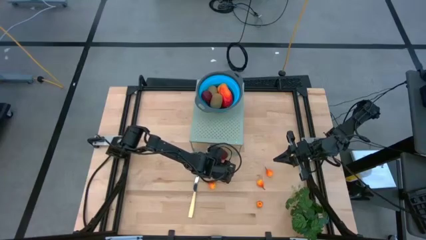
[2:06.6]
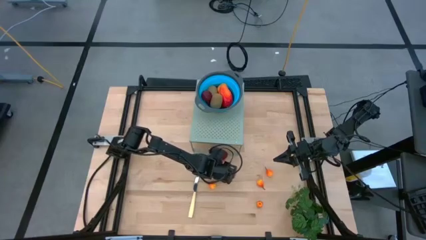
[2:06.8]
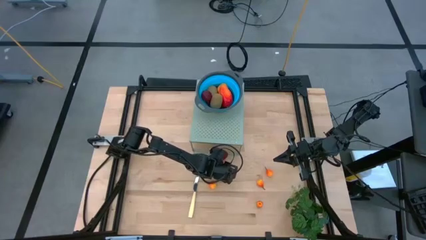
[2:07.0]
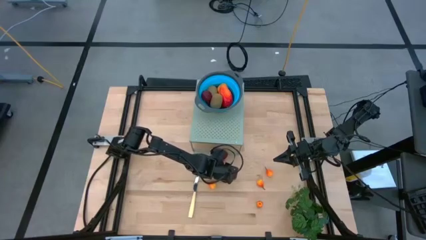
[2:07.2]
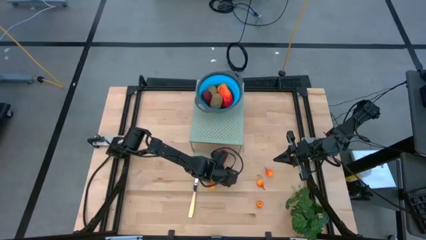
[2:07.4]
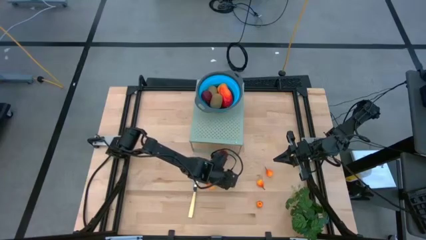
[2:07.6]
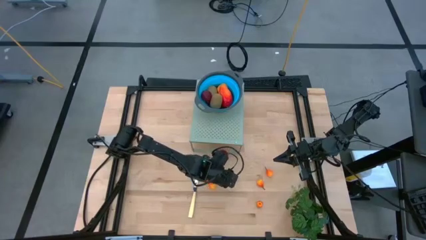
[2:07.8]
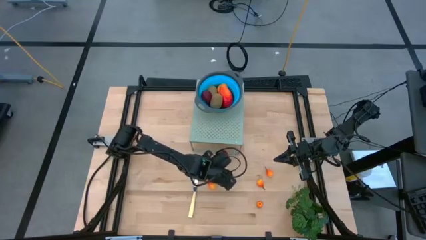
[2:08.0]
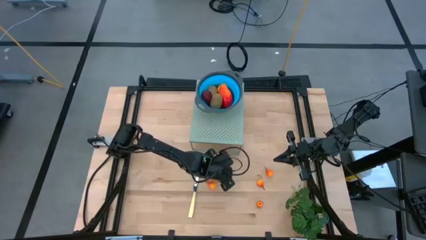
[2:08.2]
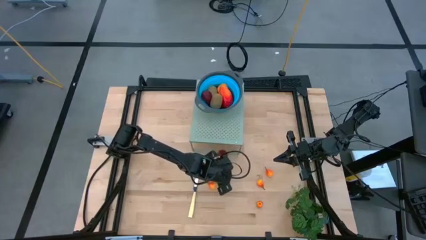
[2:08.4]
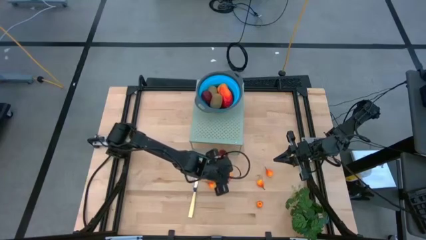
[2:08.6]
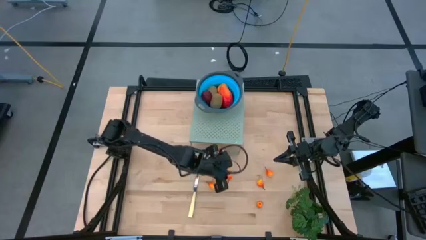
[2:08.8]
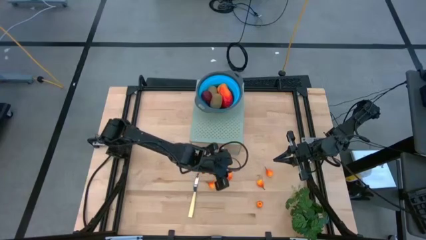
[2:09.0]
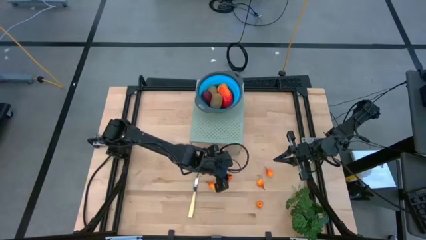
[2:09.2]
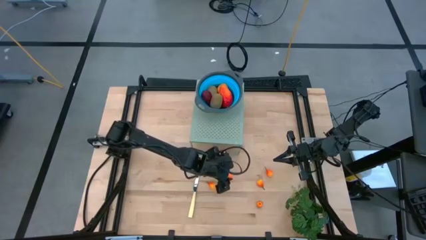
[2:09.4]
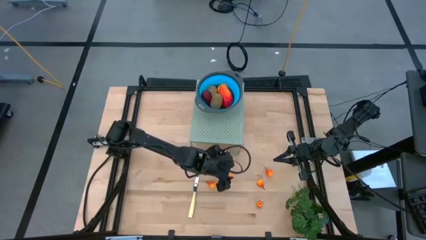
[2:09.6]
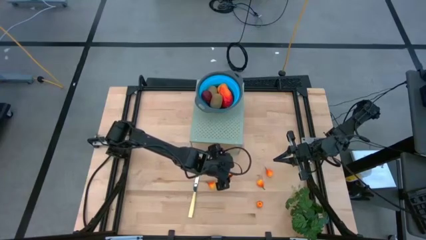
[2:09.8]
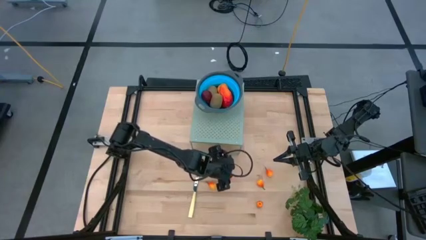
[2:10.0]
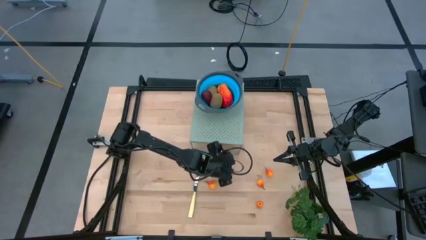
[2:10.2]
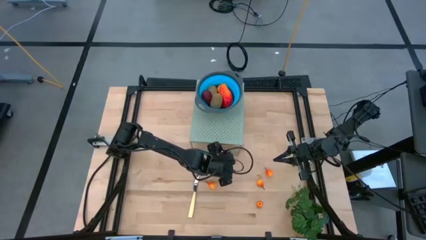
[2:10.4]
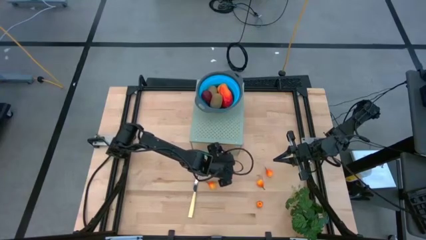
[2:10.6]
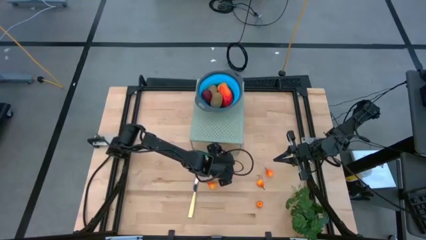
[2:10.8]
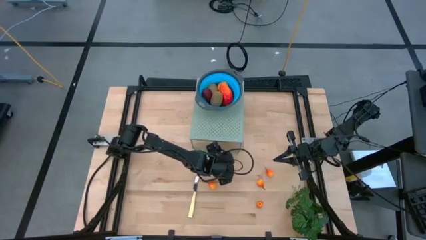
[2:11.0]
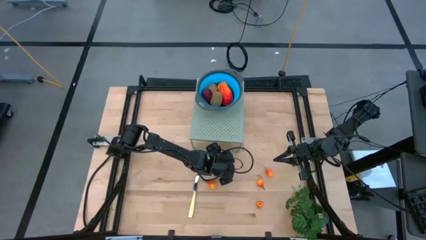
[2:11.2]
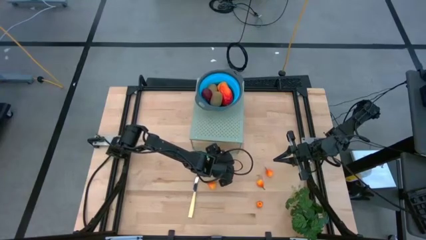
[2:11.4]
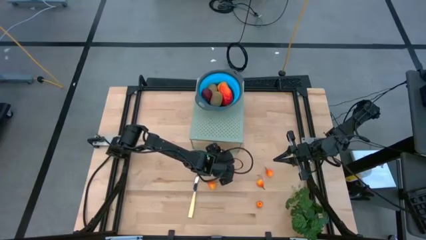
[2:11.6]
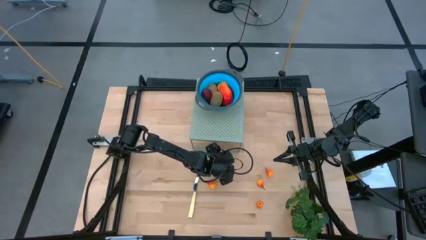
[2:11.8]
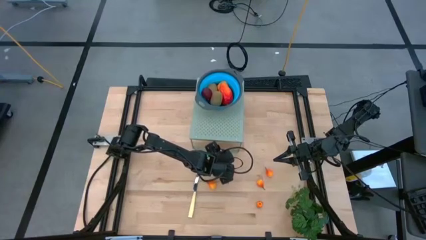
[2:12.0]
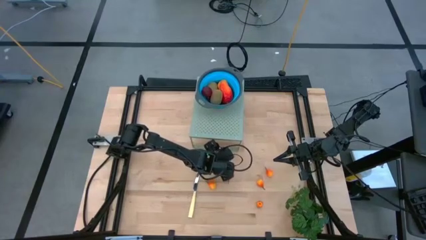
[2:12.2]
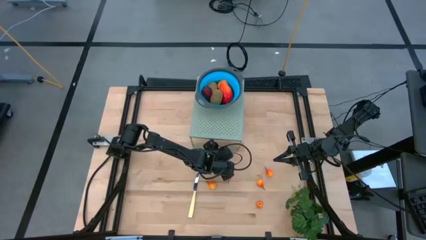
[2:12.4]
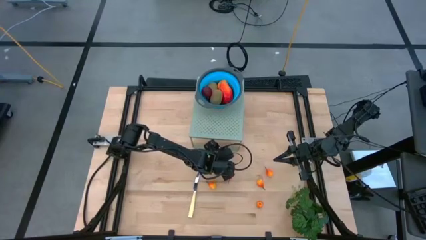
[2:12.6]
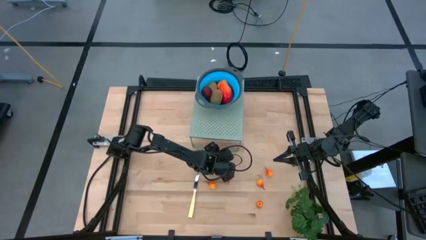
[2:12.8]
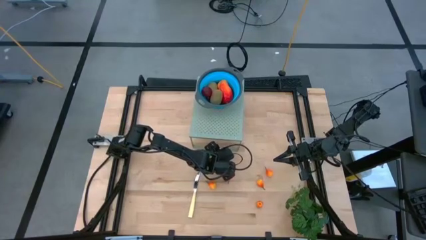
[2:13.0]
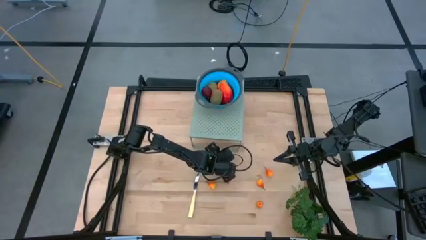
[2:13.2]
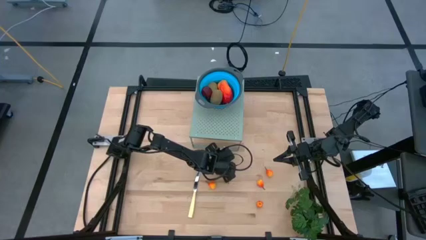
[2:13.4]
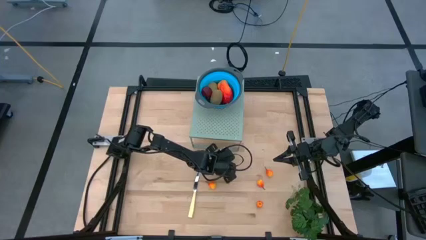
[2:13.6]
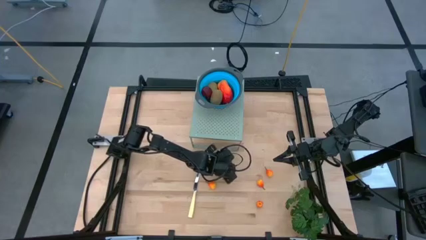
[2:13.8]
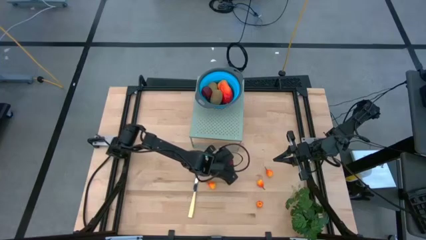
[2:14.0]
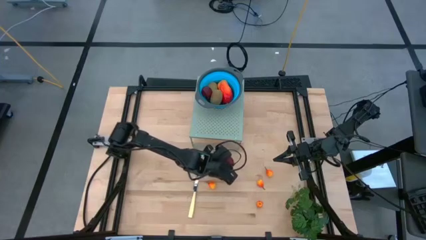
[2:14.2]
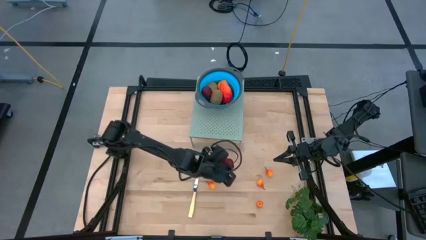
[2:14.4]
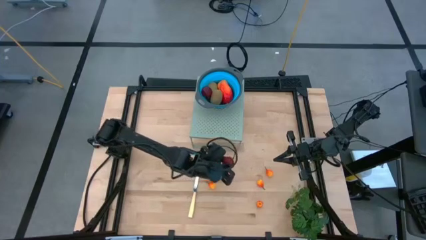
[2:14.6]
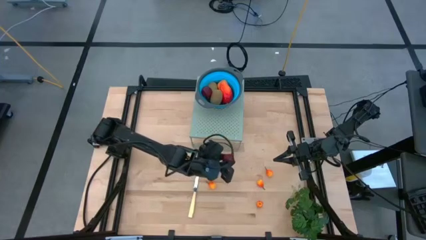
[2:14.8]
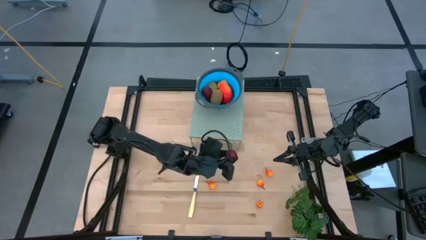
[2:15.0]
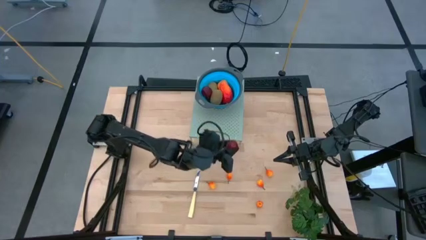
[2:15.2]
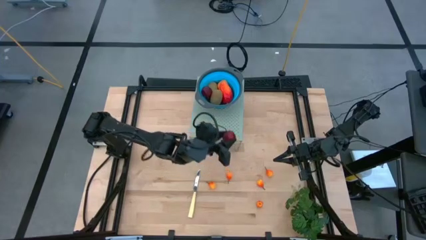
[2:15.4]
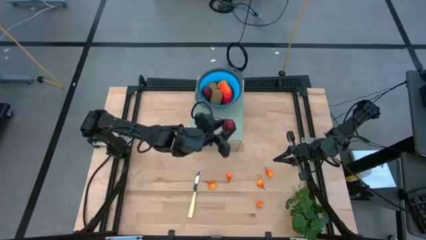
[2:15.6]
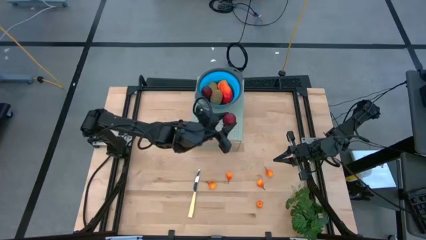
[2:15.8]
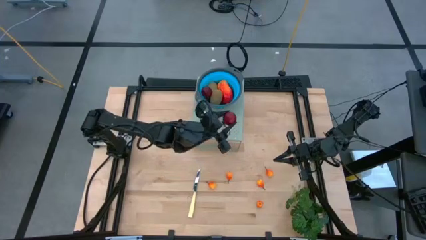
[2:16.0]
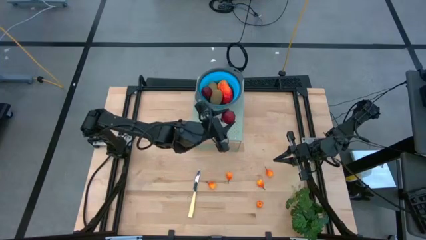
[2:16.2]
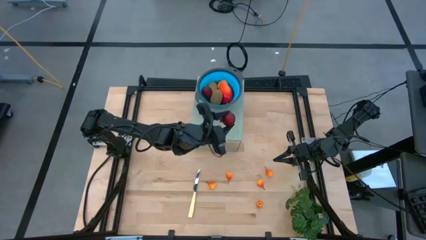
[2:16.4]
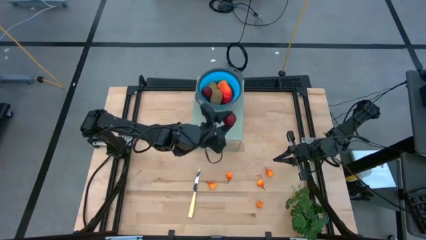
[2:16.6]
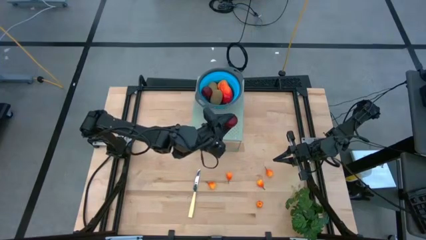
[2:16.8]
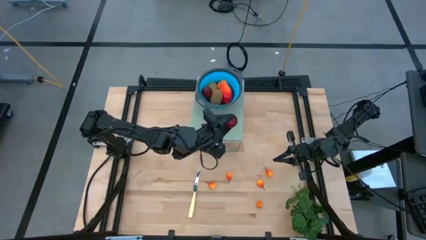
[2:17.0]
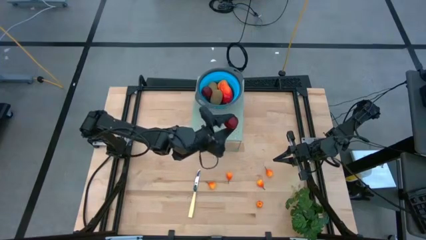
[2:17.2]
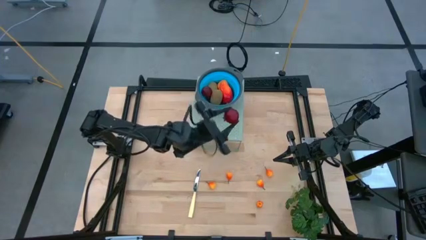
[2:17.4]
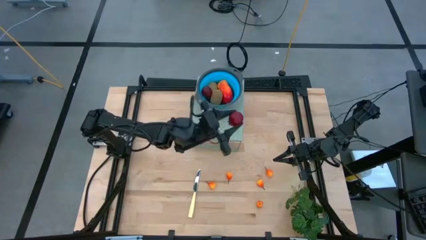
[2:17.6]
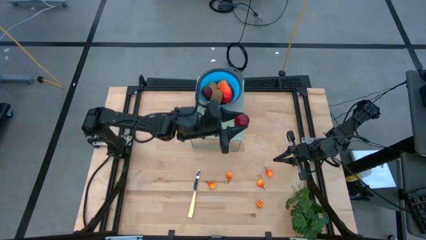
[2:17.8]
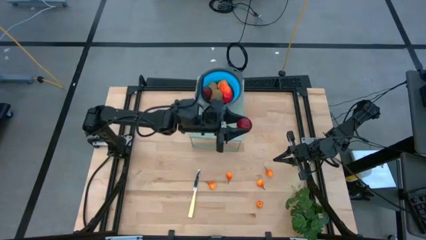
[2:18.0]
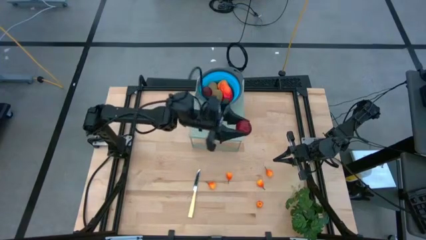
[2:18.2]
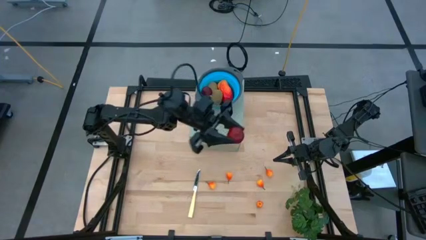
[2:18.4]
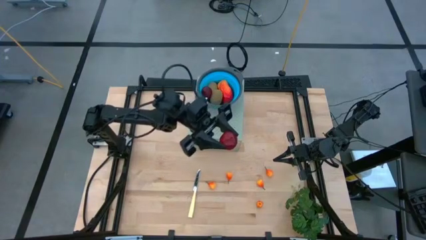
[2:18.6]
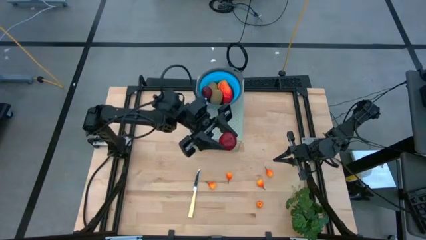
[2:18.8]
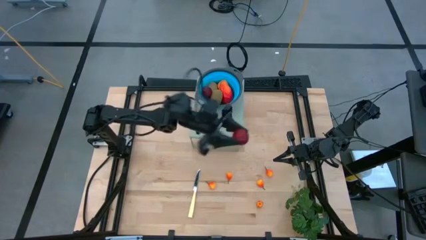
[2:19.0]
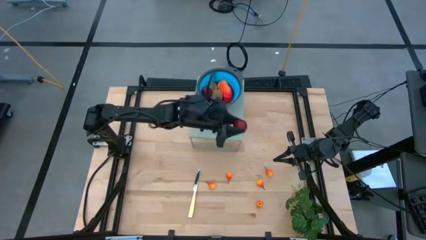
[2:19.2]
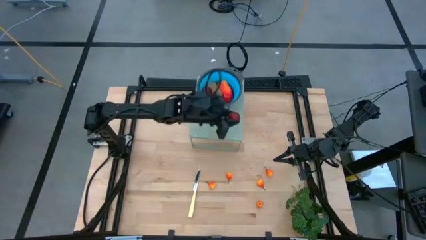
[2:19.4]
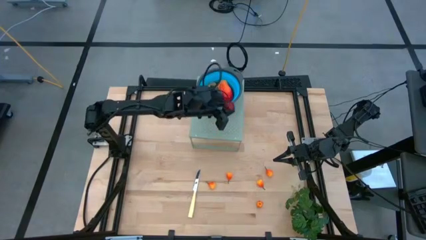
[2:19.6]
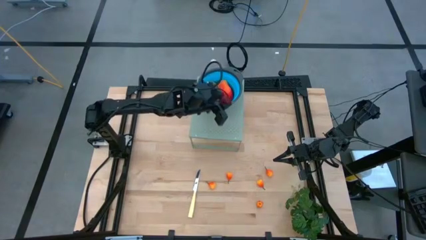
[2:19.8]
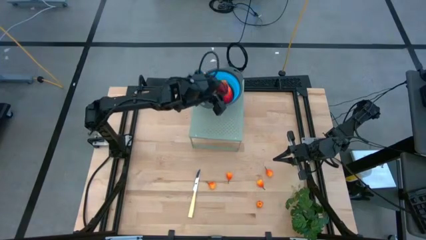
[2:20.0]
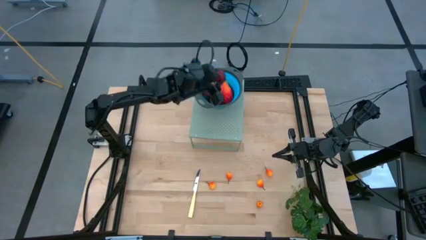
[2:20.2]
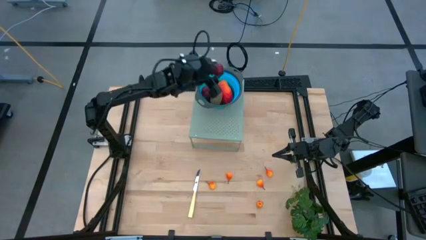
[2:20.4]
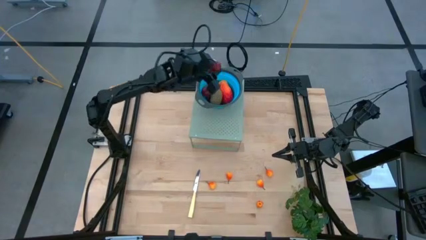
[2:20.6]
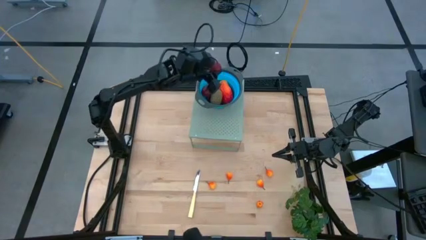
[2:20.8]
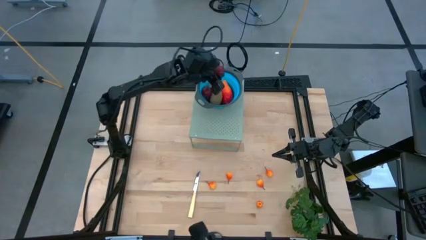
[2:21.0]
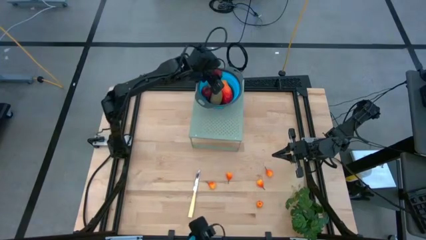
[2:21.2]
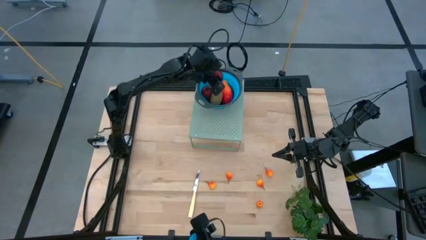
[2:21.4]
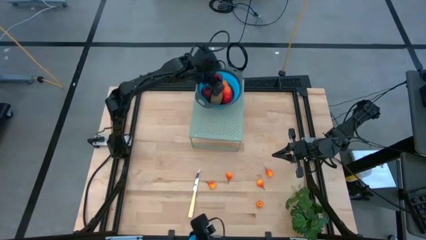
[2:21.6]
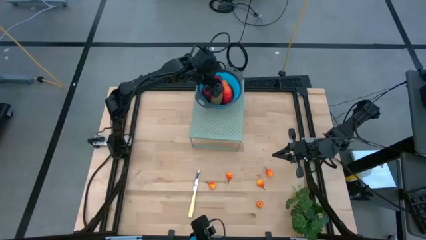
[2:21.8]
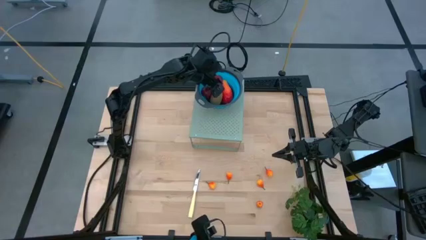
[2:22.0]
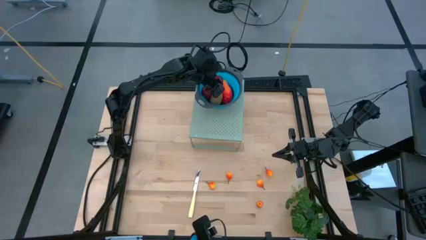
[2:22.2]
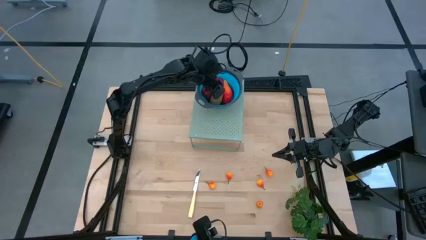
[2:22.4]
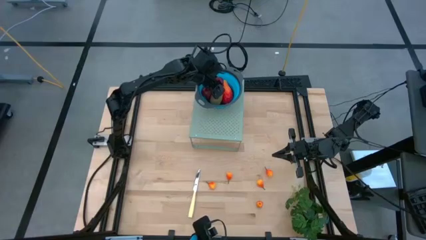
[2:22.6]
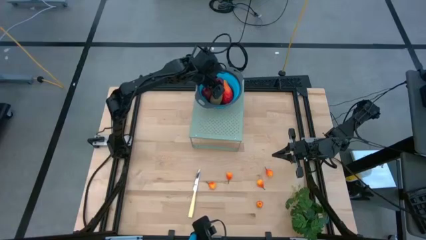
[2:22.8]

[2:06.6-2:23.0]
Task: Pick & Place Fruit
Put the pomegranate into the blue strainer bowl on the shelf
